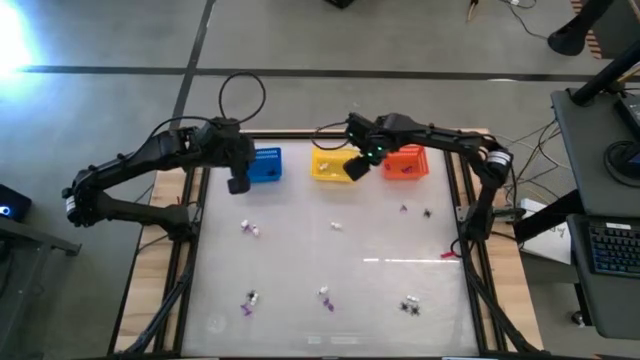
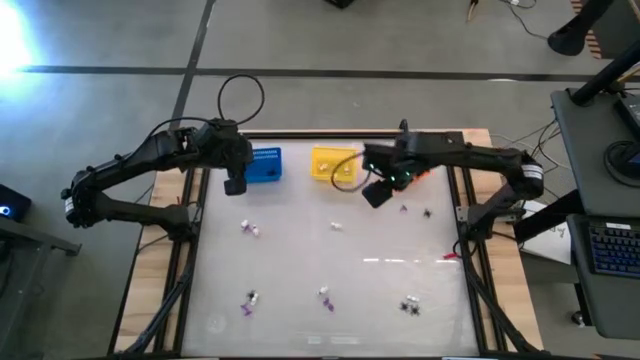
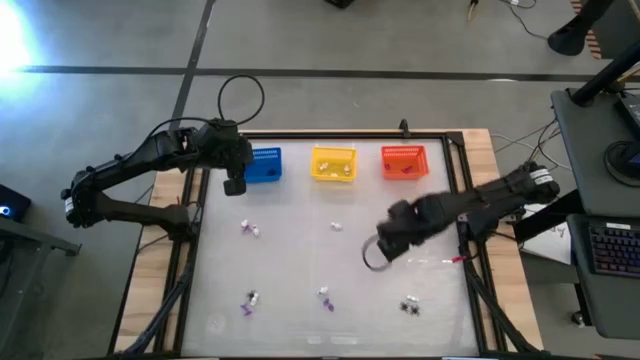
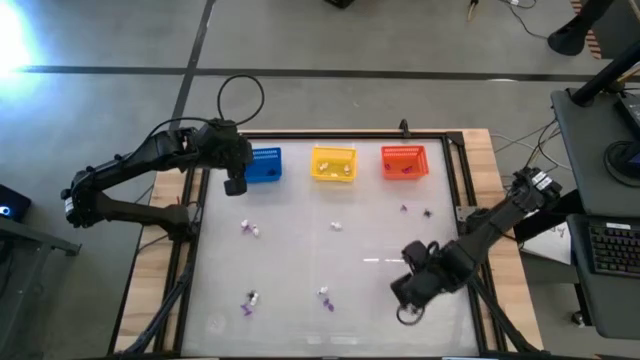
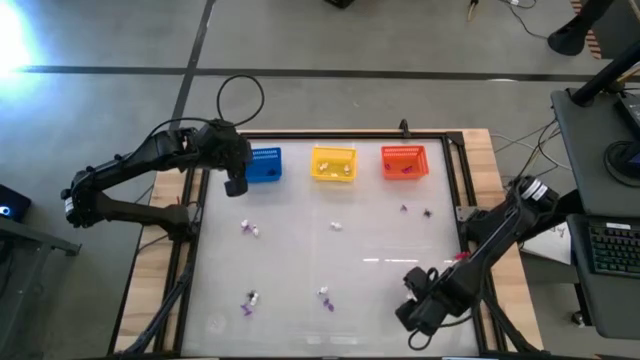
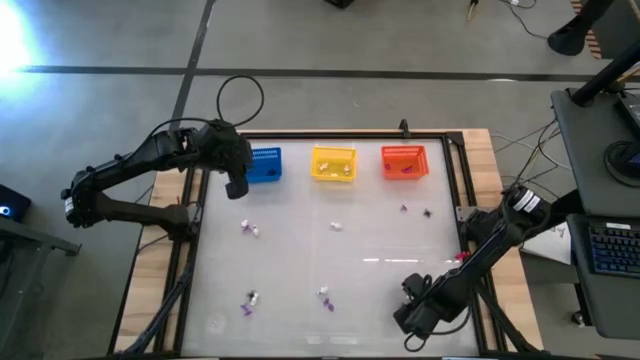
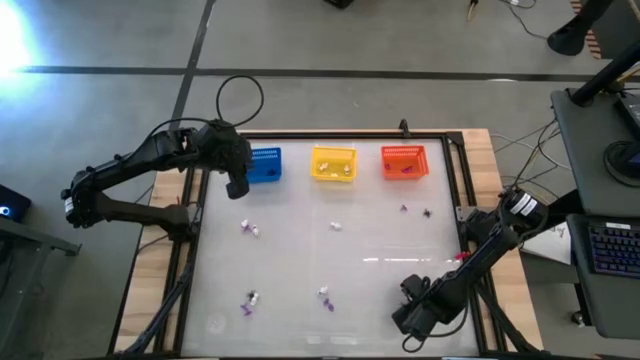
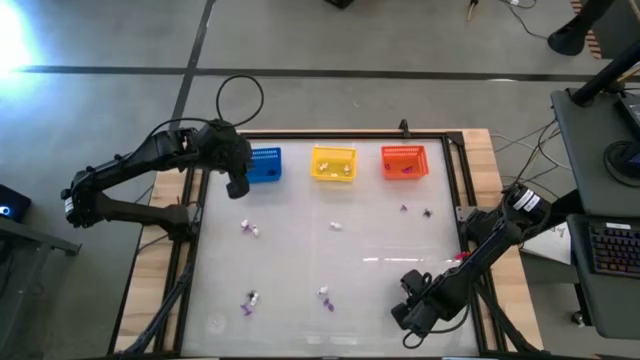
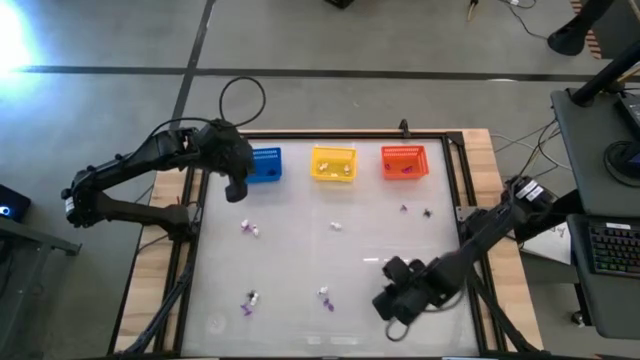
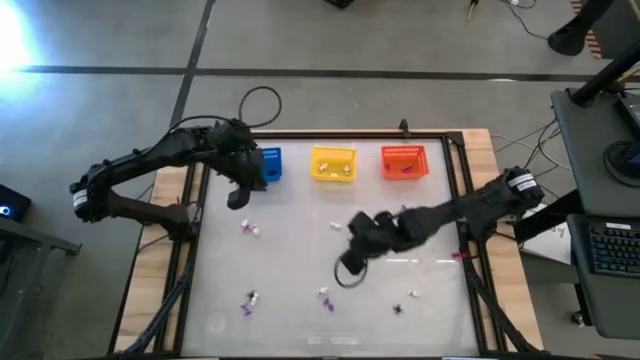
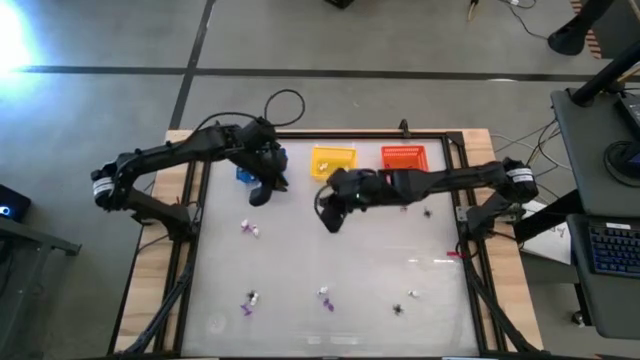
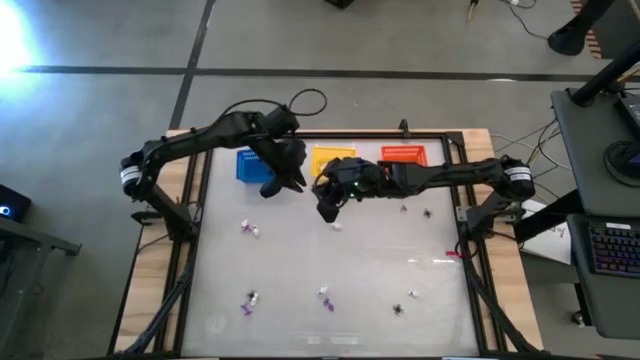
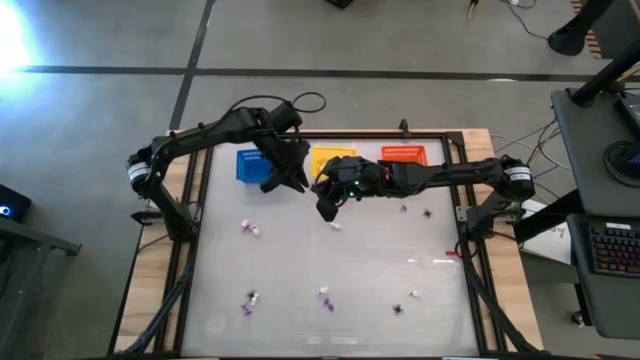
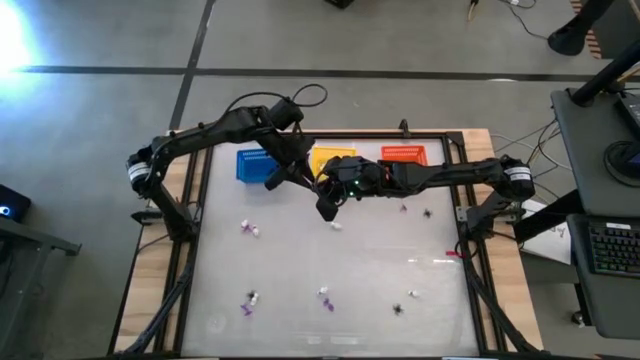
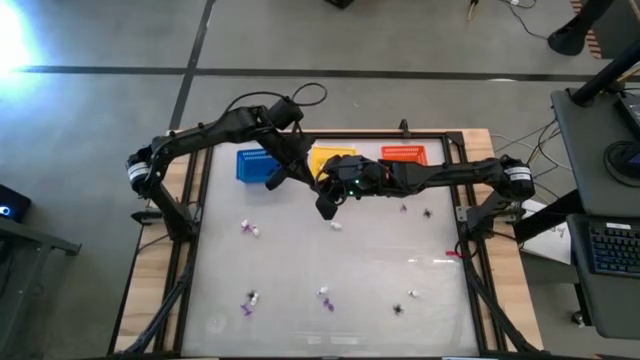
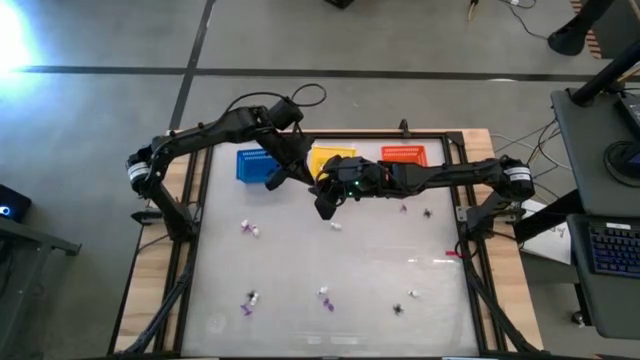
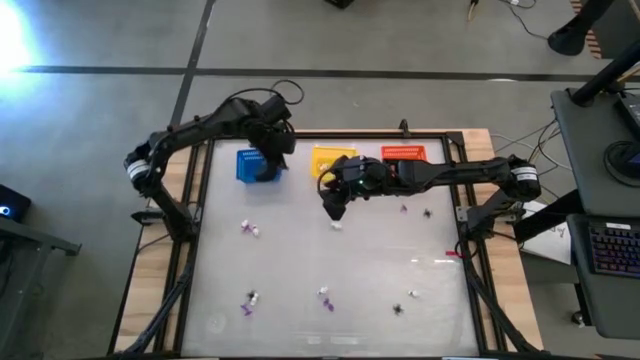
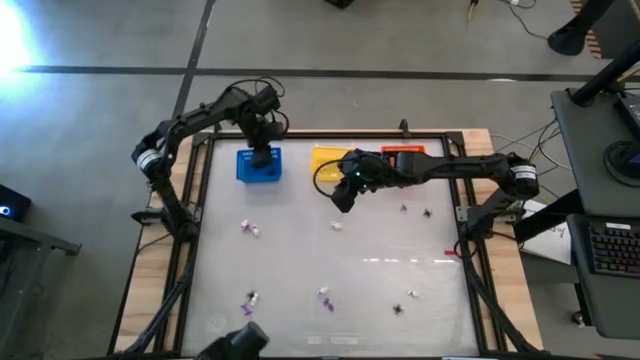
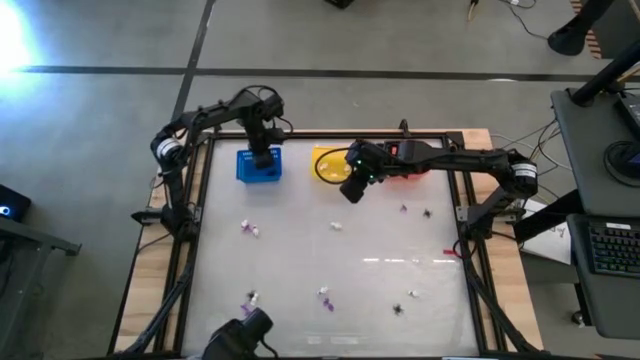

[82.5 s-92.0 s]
Task: Sort Halloween decoration
Put the black toy spider into the blue bin

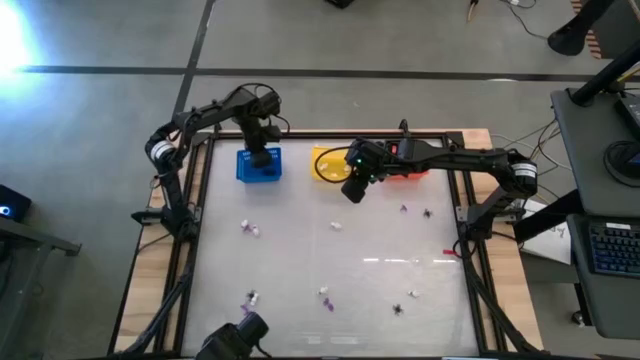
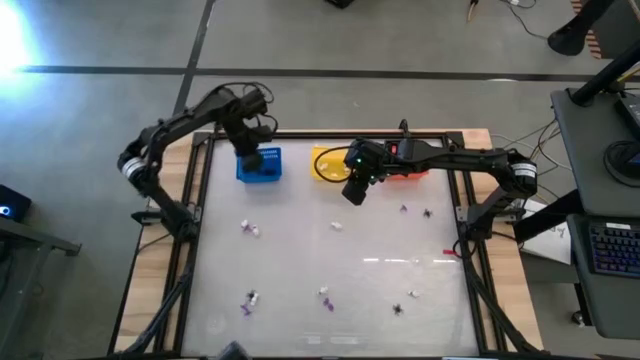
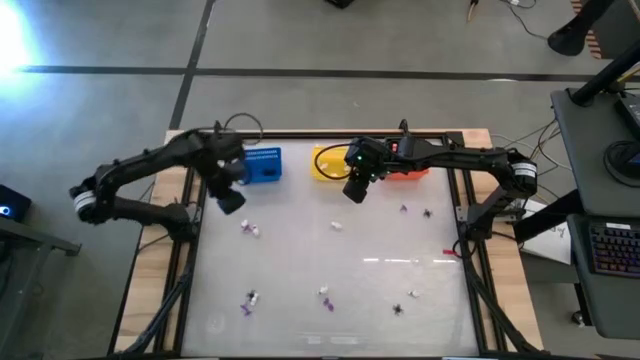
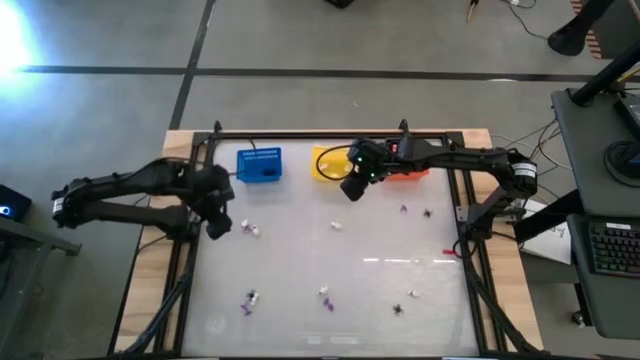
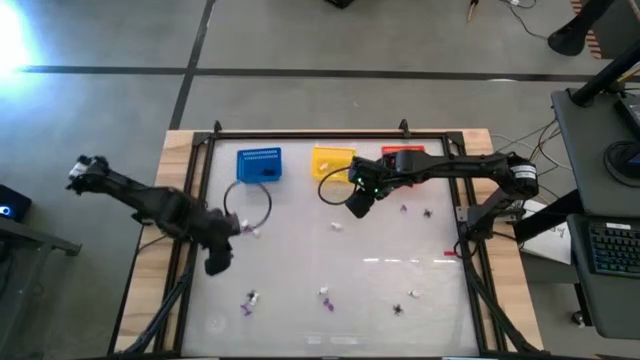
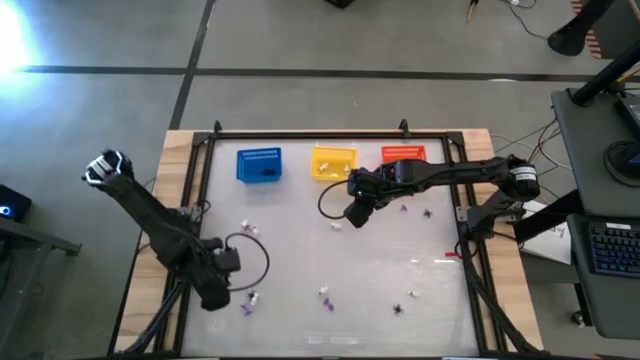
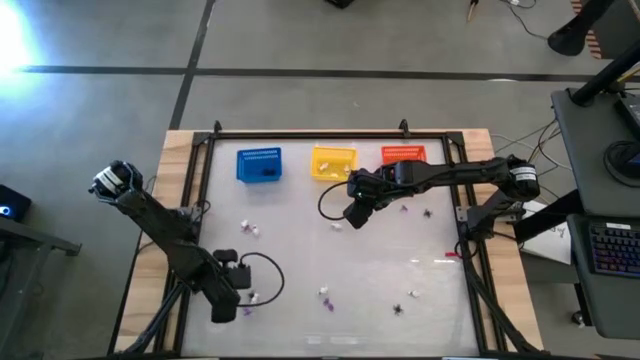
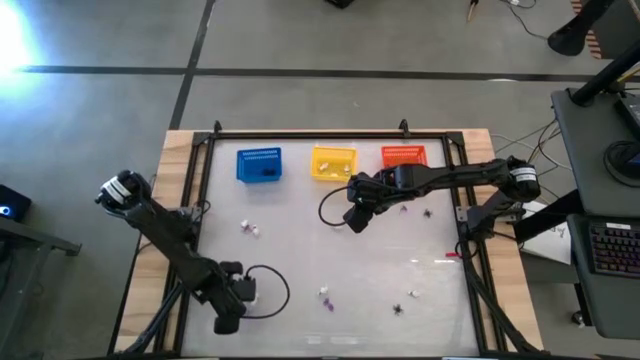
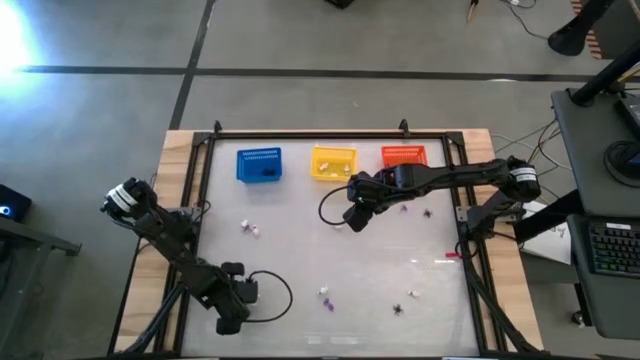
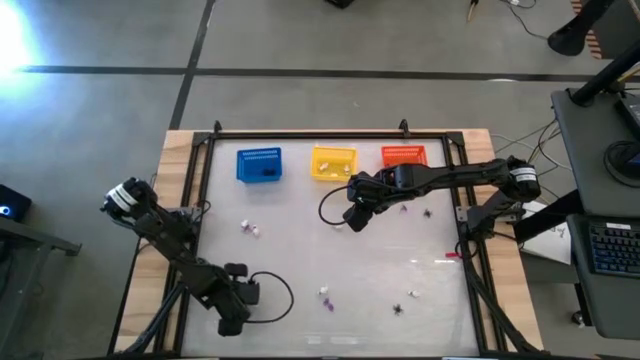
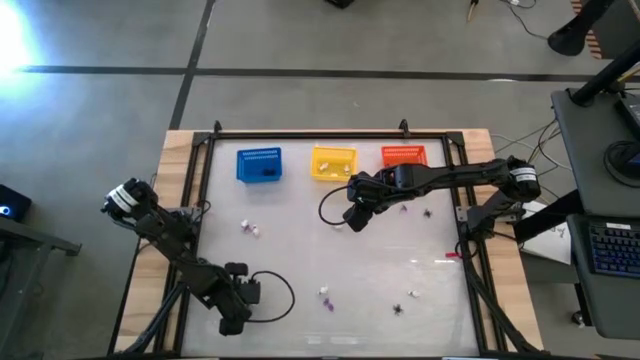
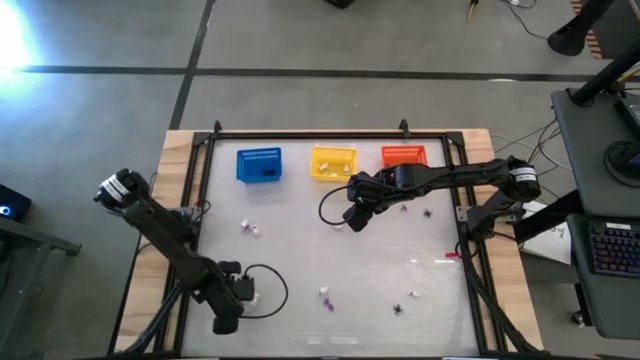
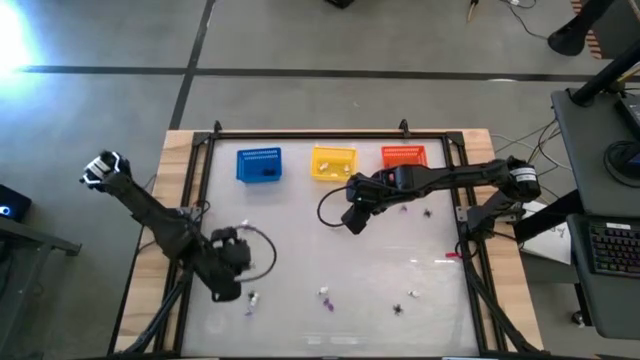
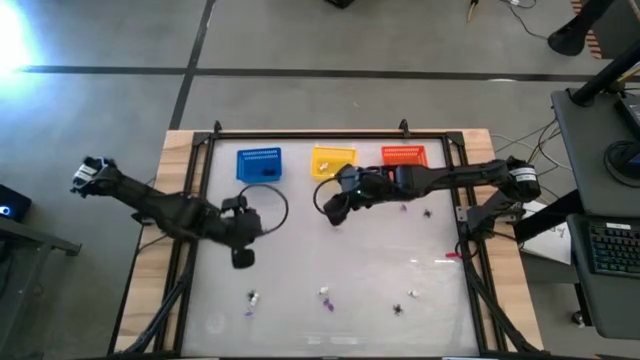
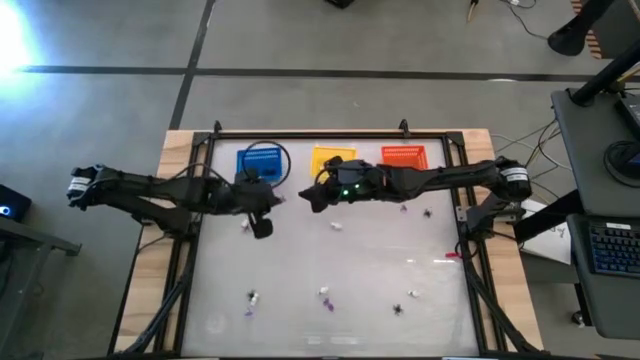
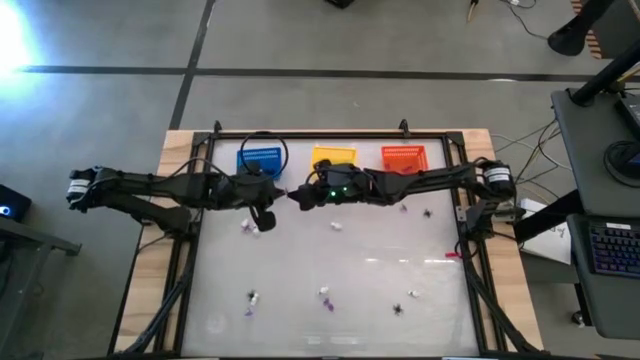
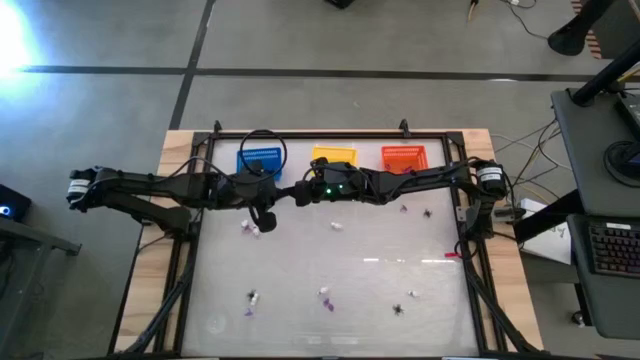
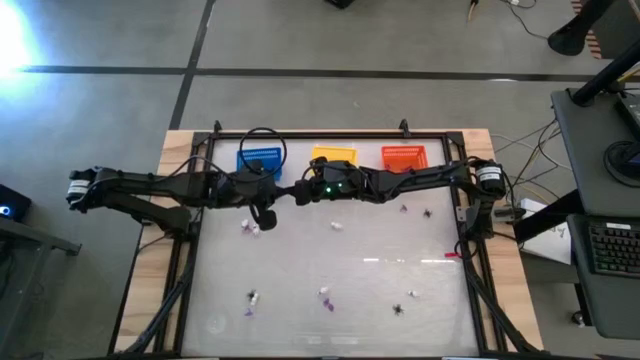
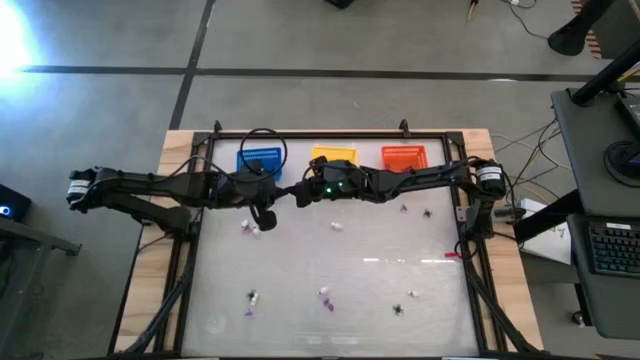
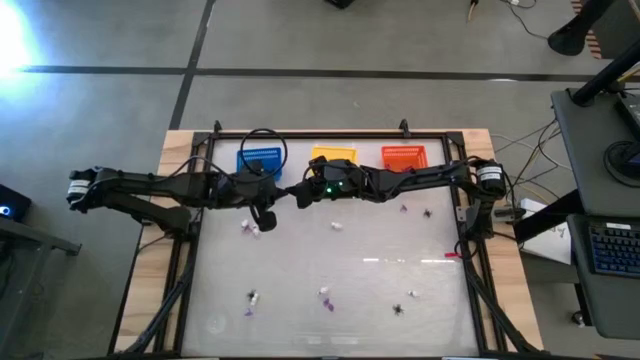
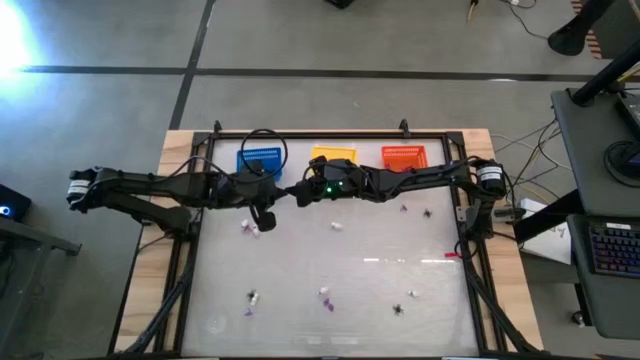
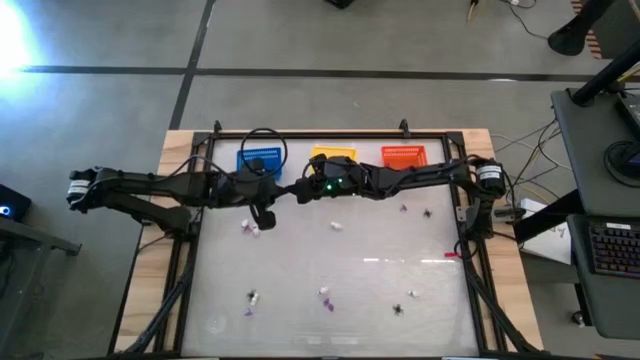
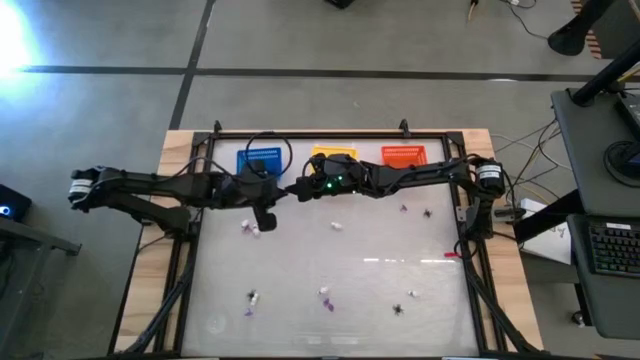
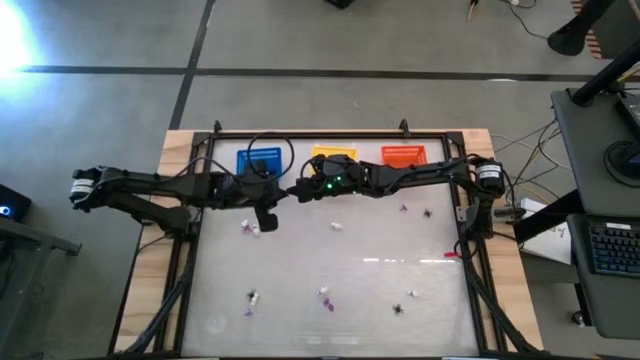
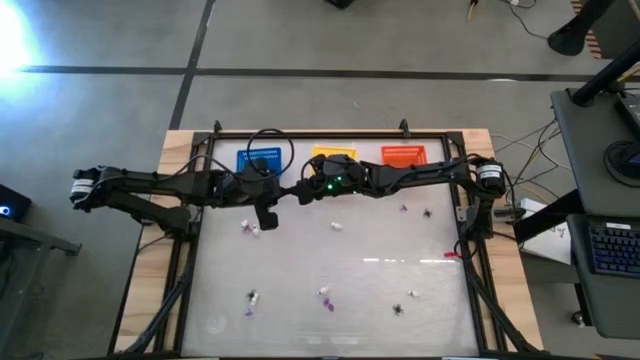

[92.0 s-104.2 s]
Put the purple hat toy into the orange bin
